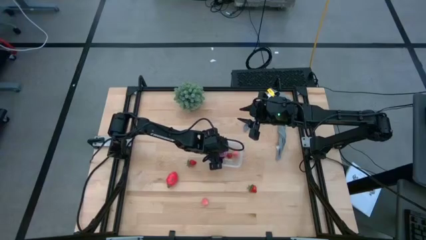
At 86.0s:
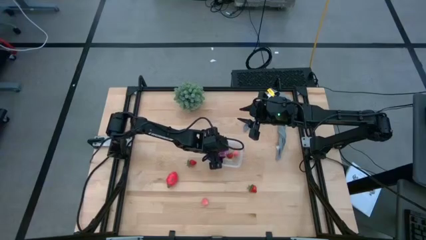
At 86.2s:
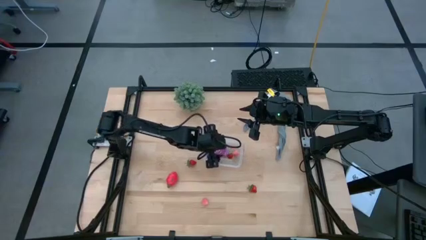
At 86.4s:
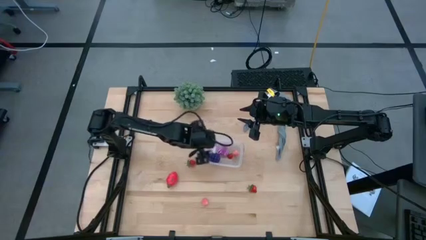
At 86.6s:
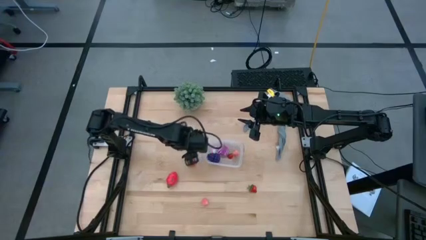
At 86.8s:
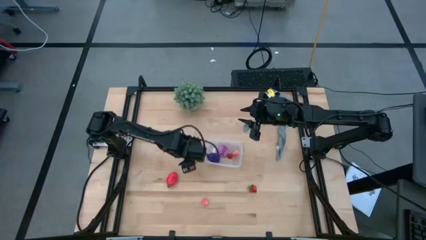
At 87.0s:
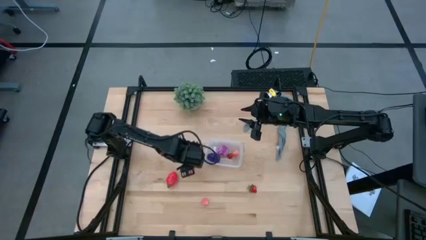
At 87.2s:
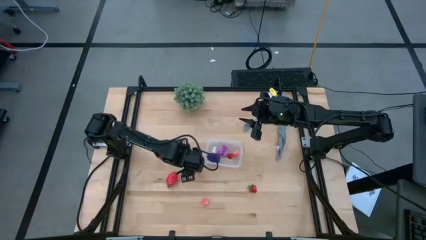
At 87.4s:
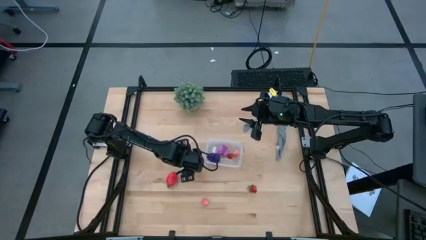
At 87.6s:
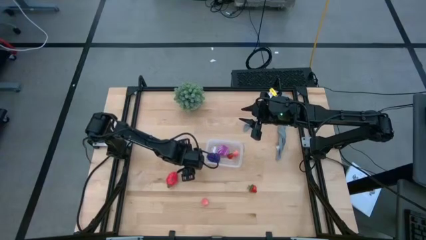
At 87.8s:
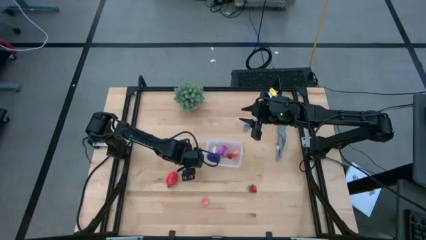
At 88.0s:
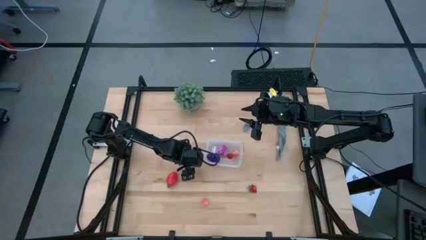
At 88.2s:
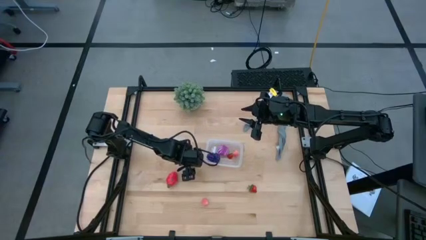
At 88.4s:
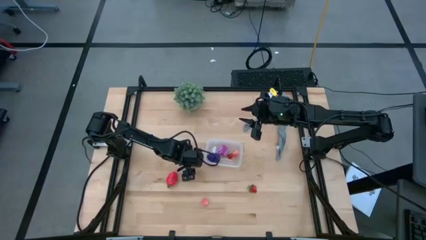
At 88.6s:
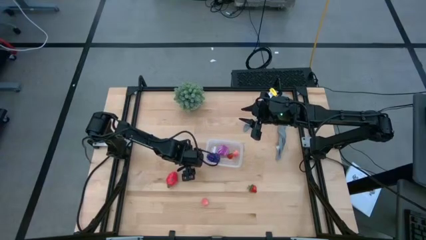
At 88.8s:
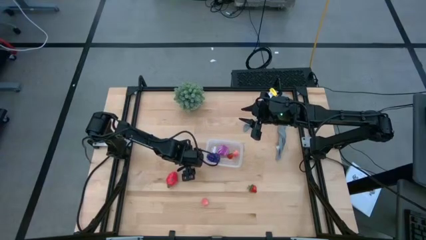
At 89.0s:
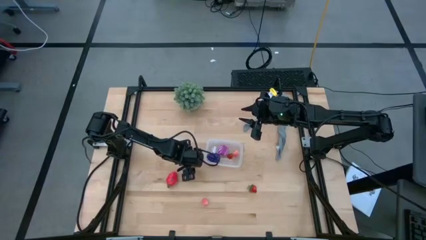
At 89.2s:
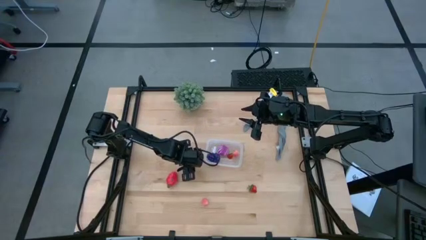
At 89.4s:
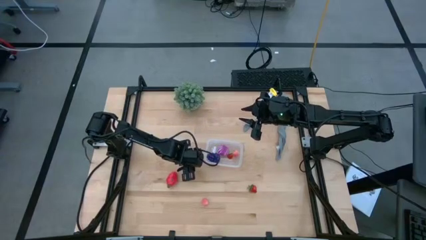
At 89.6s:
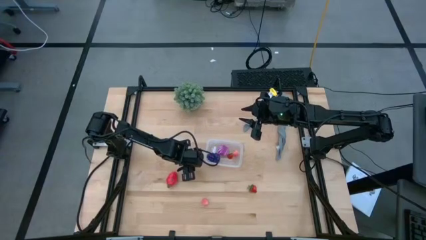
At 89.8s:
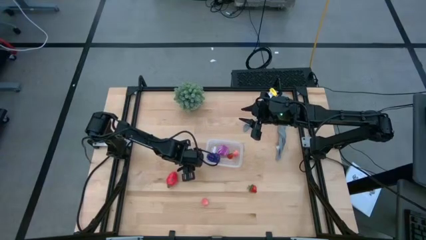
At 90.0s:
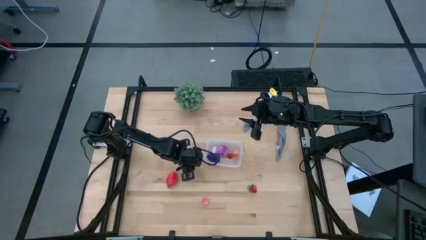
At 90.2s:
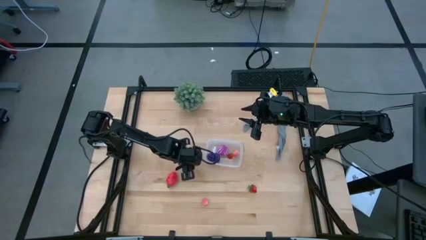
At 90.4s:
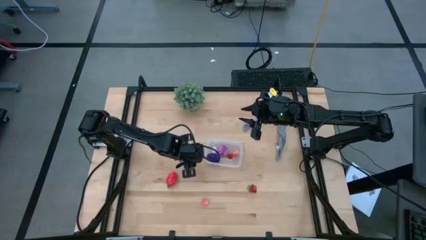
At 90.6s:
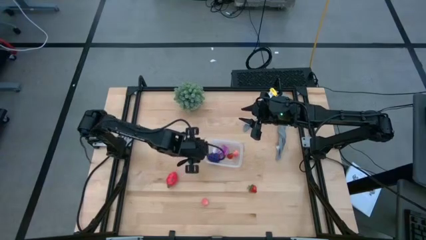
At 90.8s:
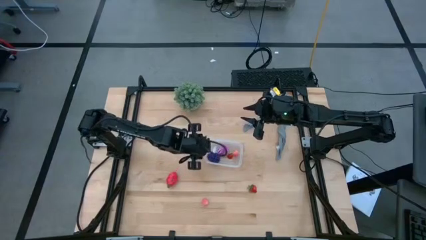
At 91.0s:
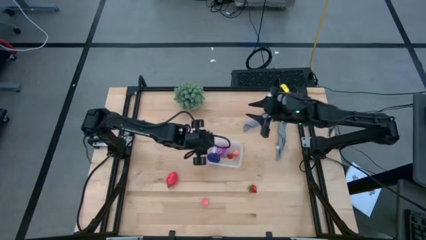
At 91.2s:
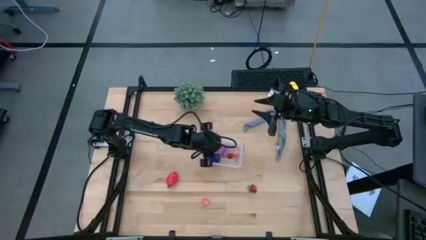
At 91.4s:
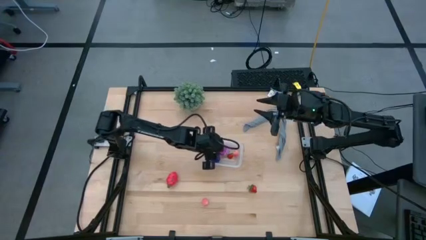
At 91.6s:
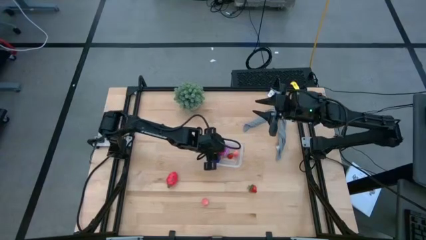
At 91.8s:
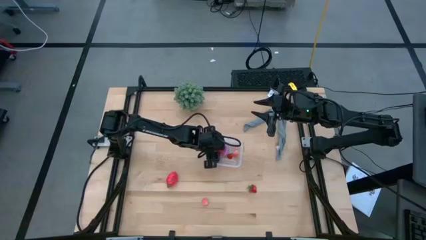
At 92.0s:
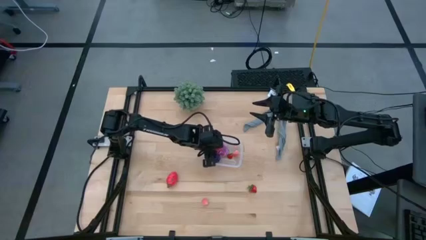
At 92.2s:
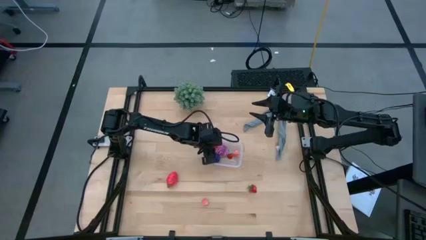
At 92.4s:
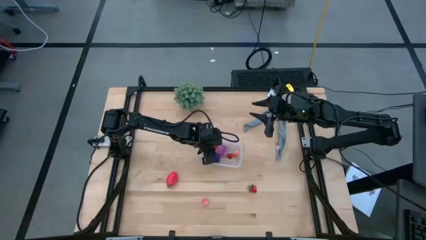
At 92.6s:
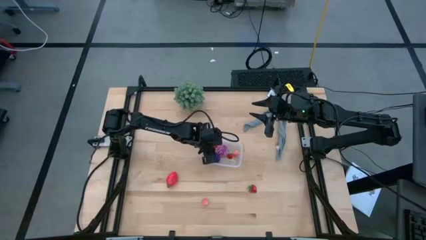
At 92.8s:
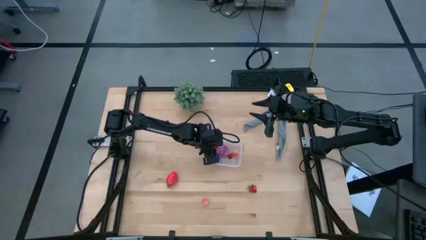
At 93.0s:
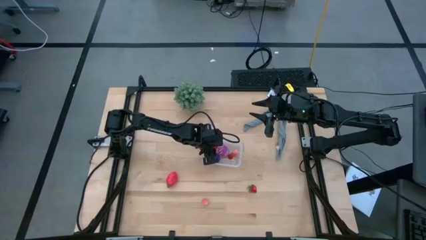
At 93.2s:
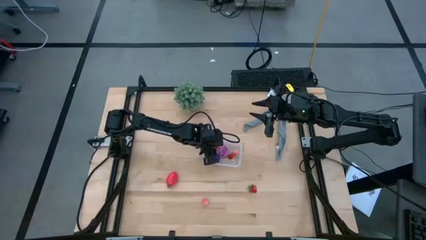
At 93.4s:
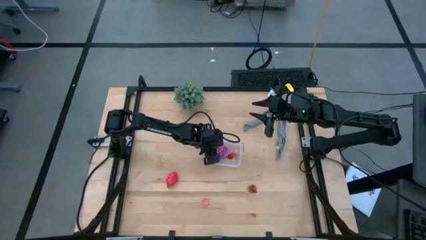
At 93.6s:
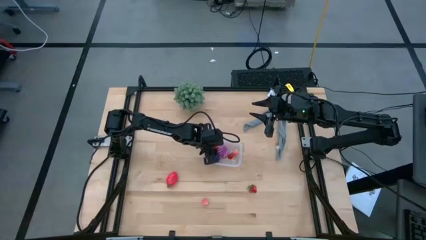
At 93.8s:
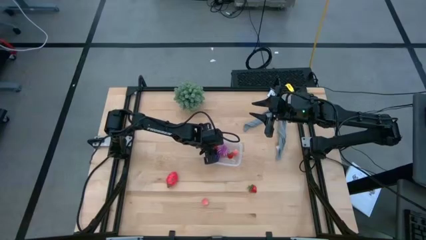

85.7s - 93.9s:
Task: Pick and placing Produce into tupperware
Put the left strawberry into the transparent container

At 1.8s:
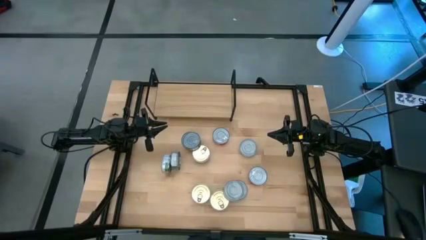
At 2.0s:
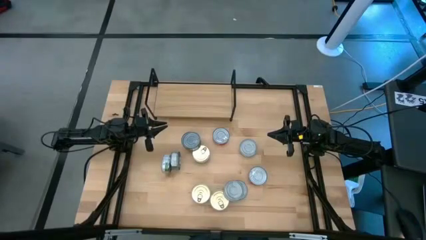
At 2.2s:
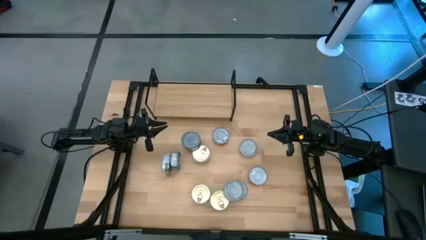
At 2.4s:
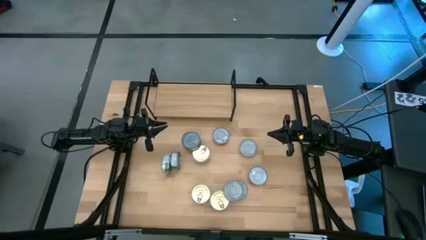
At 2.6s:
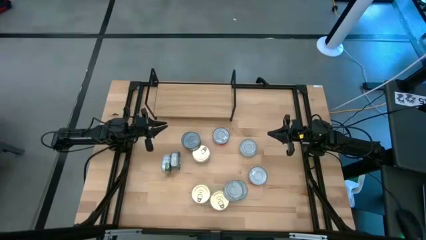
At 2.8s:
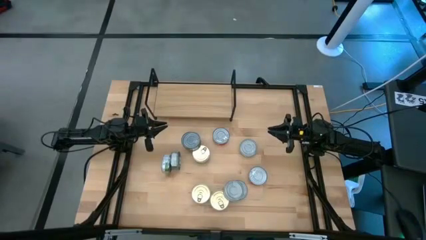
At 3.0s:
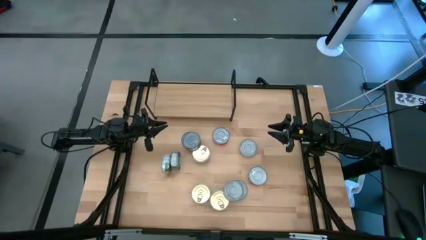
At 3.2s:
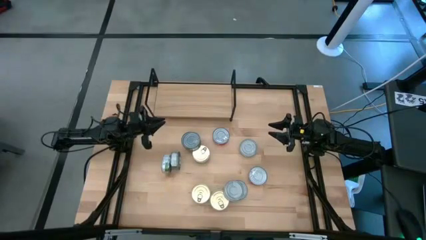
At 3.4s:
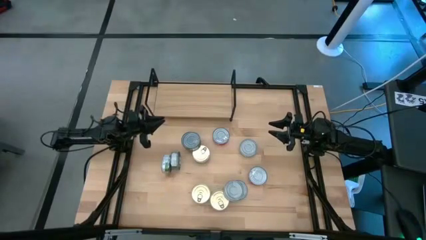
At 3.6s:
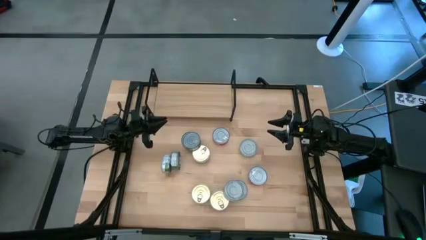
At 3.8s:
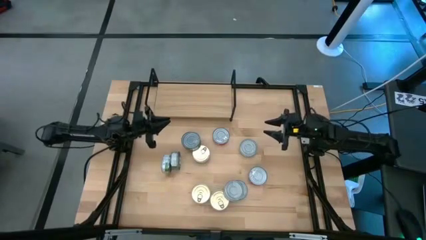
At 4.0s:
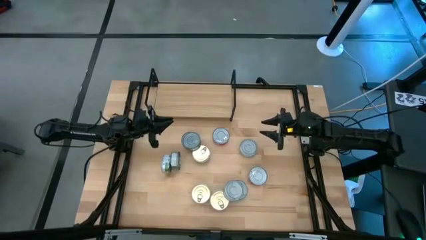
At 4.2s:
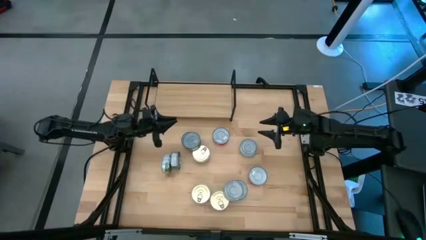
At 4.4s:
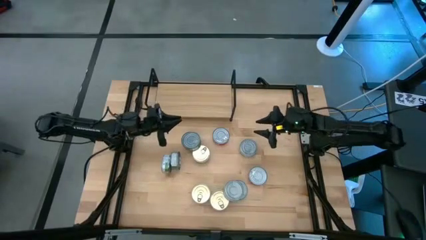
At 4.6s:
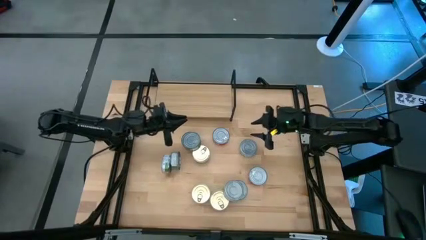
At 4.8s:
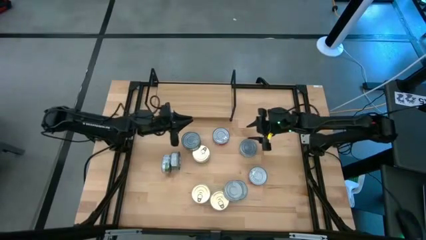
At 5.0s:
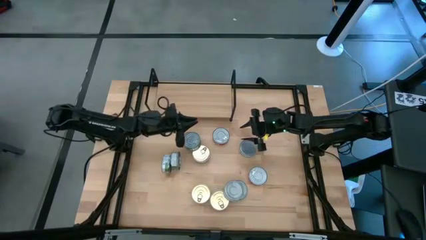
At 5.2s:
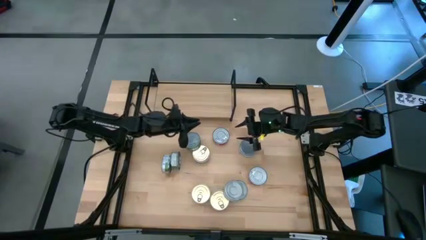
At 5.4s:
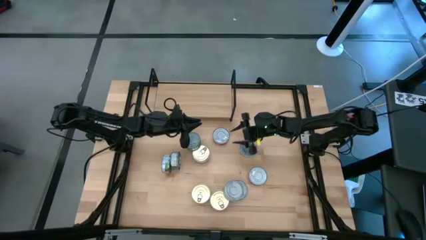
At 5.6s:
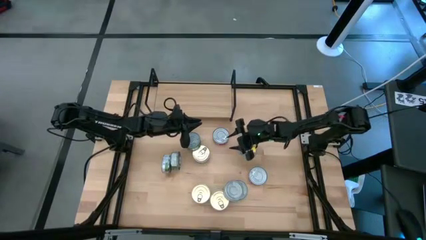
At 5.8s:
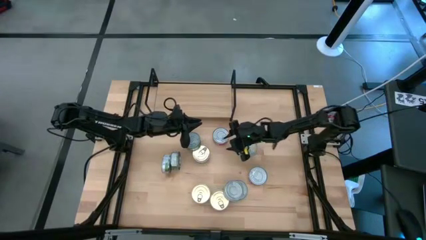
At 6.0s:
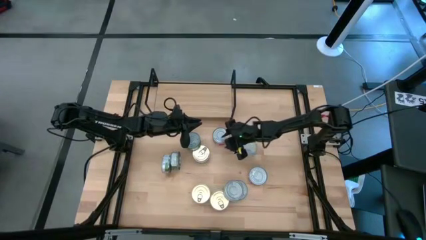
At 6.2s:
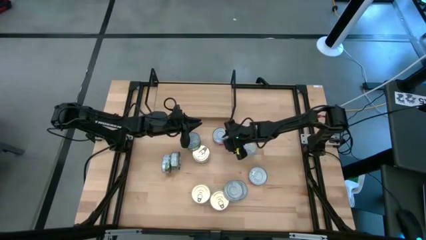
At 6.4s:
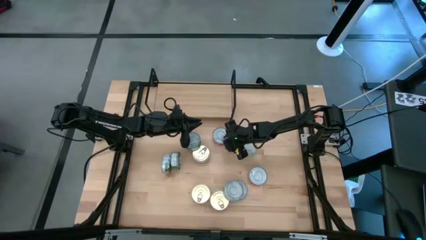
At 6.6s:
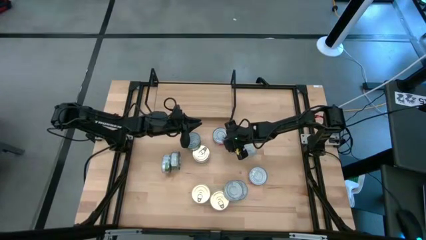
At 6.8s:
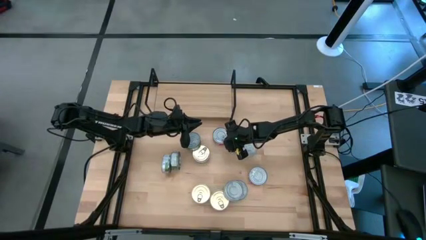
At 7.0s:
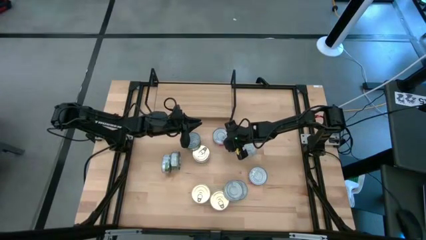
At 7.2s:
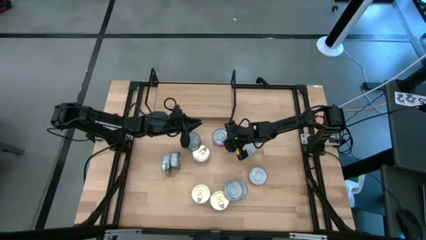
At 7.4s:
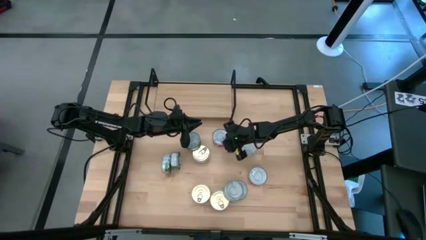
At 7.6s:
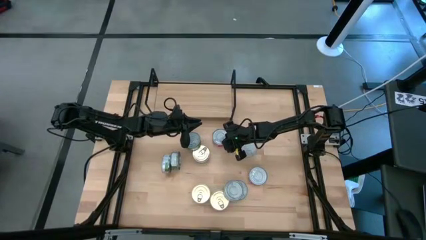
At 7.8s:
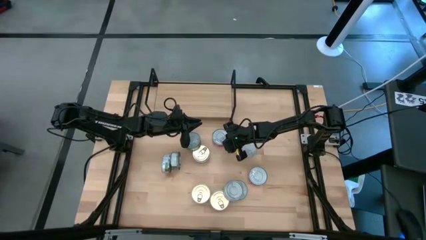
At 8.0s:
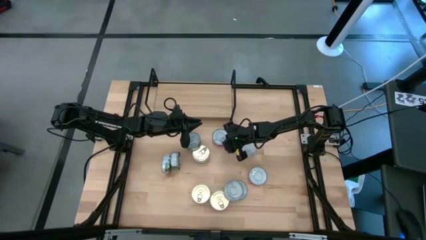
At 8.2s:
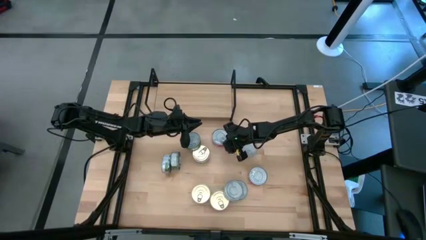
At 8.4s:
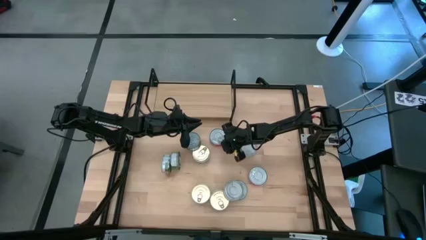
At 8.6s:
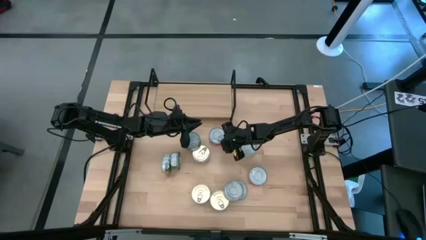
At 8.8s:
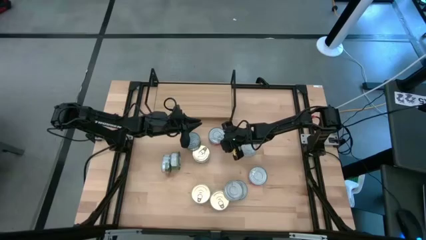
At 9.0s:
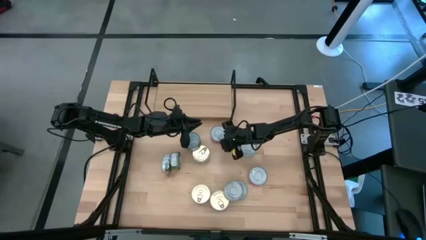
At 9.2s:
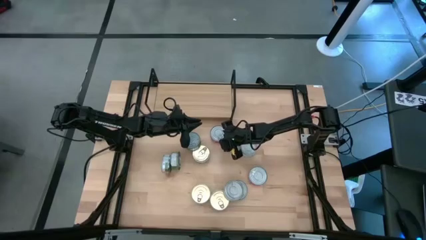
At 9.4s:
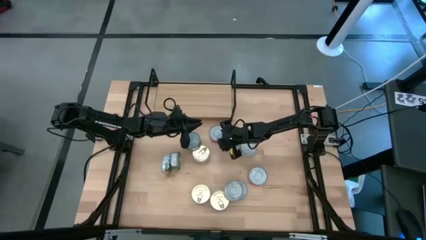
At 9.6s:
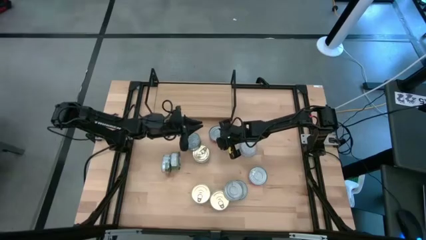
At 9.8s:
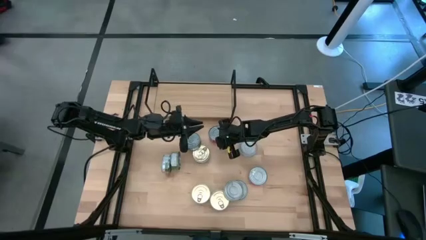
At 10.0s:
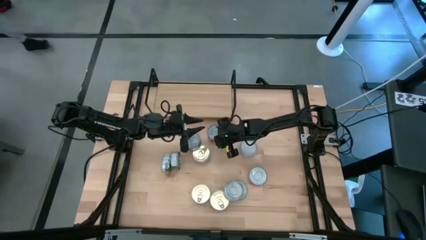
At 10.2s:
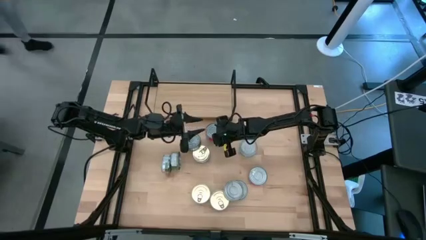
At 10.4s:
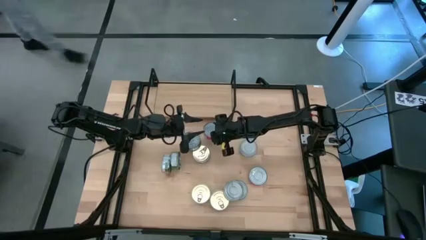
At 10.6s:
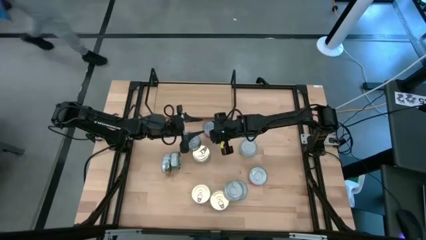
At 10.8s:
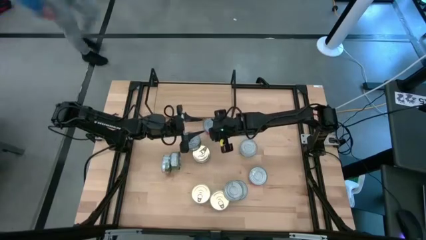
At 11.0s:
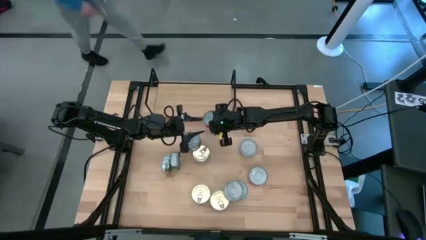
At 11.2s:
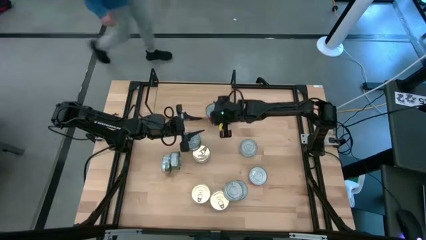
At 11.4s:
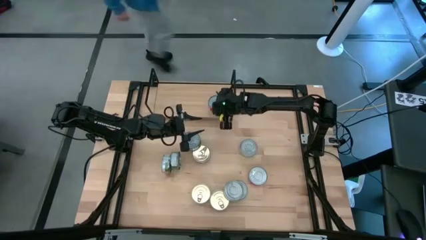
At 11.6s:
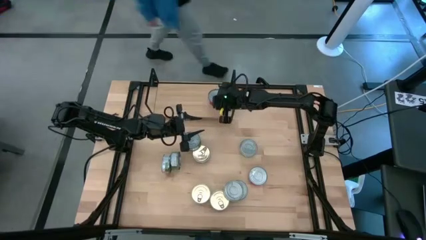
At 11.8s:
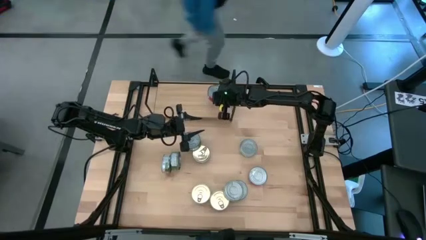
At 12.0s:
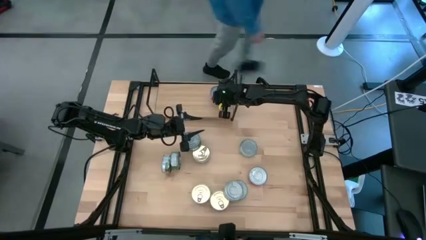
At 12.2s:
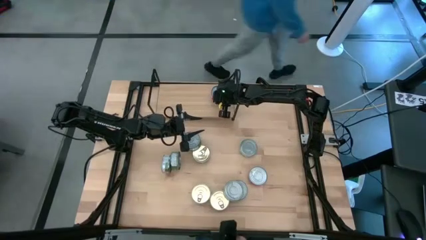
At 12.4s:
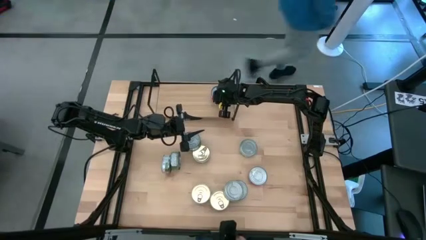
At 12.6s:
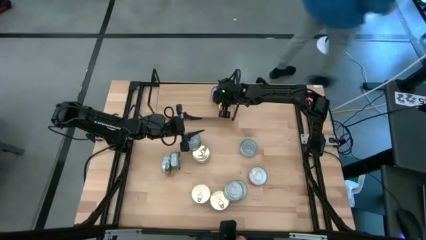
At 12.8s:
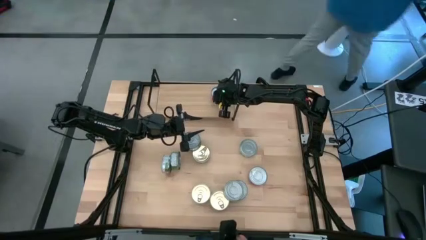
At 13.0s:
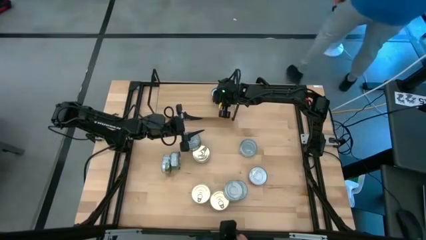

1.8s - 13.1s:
Task: Stack canned seafood by type on shelf
Put the red tuna can on the shelf
